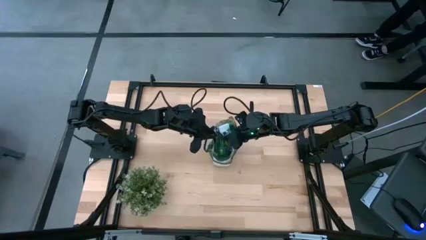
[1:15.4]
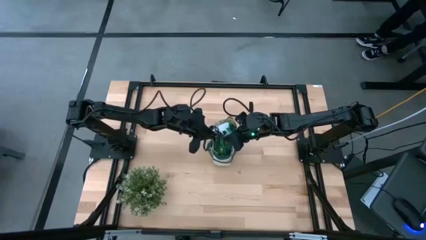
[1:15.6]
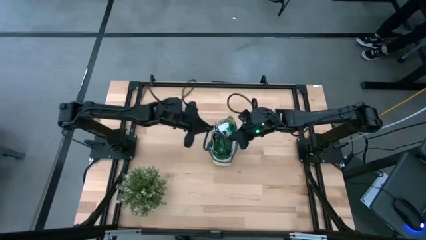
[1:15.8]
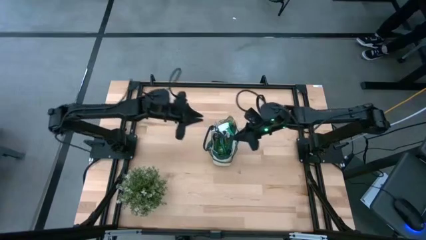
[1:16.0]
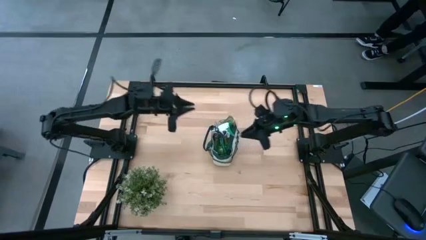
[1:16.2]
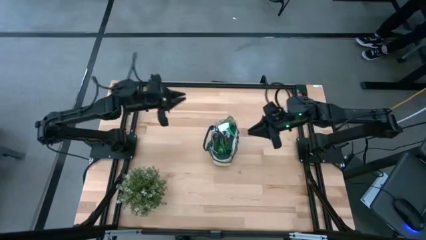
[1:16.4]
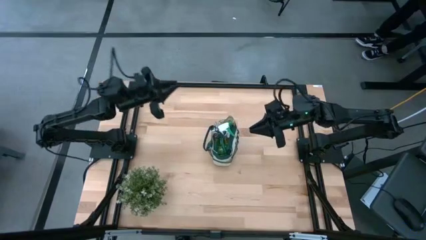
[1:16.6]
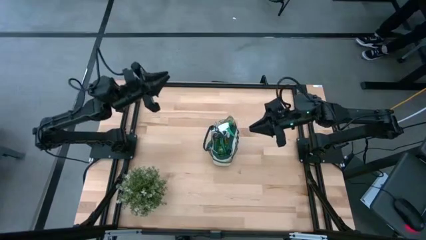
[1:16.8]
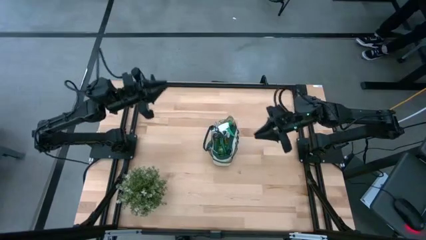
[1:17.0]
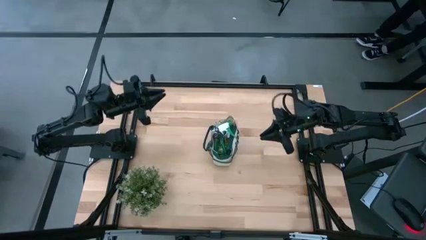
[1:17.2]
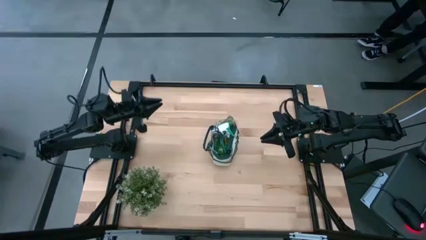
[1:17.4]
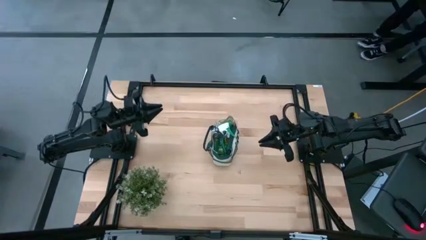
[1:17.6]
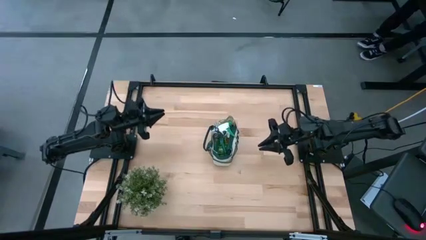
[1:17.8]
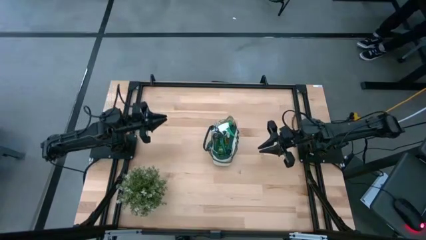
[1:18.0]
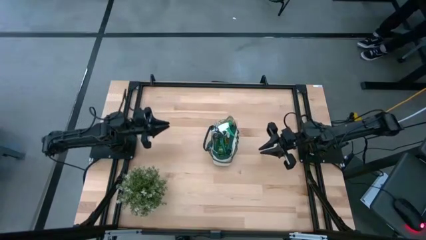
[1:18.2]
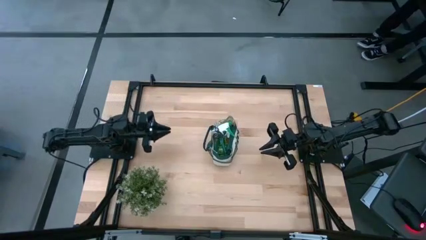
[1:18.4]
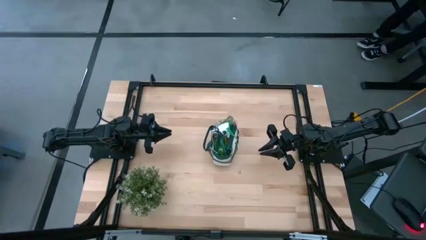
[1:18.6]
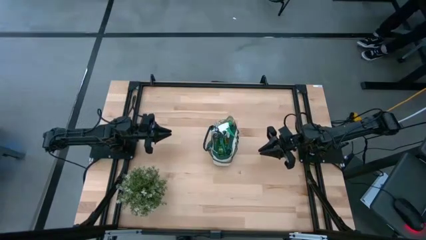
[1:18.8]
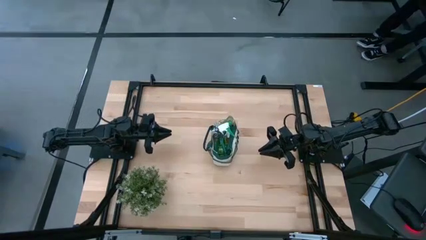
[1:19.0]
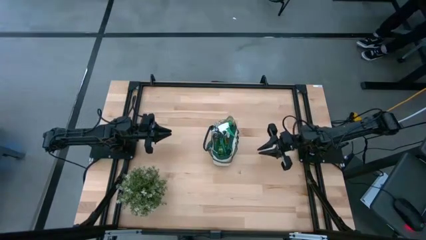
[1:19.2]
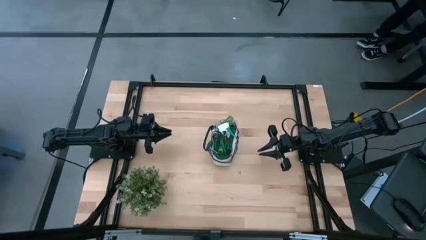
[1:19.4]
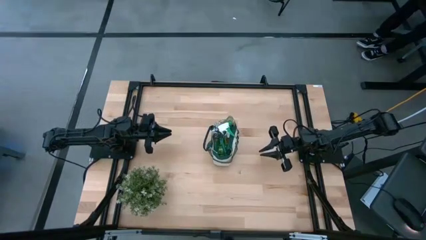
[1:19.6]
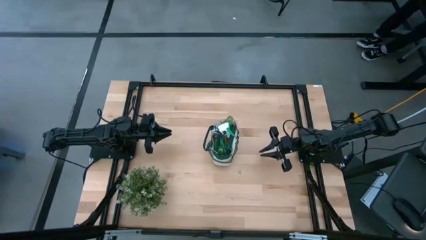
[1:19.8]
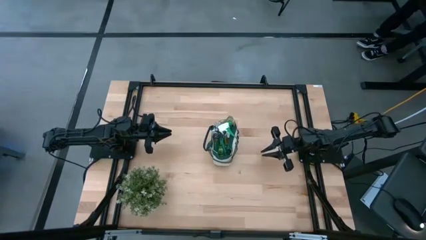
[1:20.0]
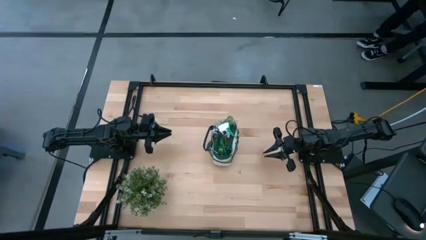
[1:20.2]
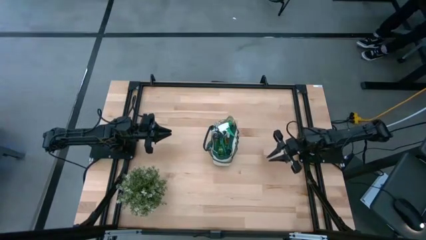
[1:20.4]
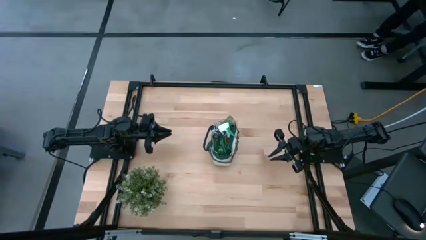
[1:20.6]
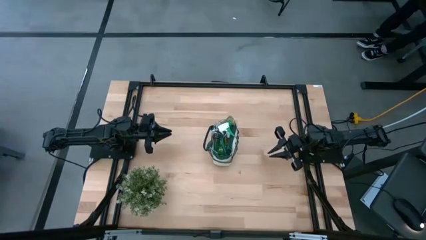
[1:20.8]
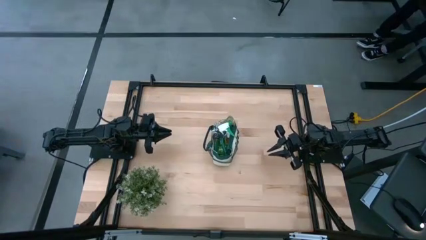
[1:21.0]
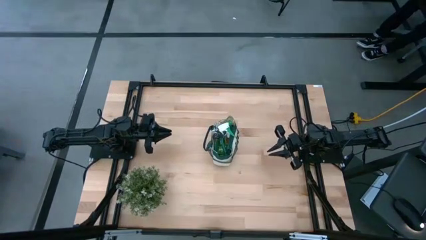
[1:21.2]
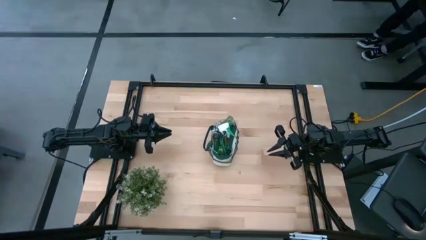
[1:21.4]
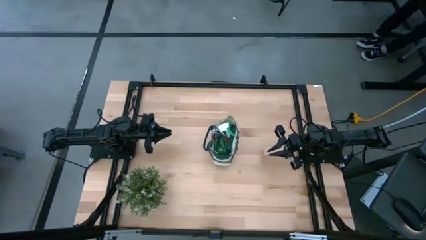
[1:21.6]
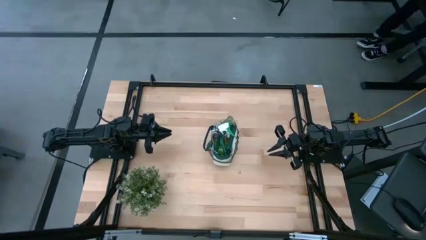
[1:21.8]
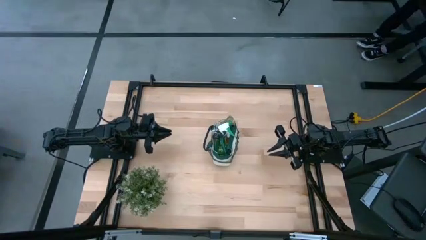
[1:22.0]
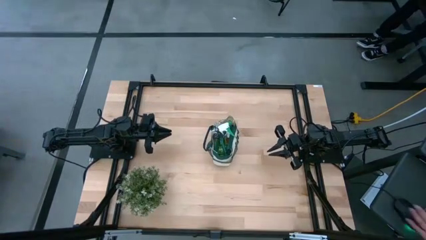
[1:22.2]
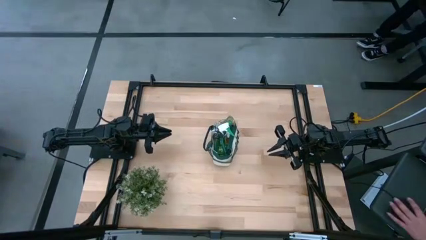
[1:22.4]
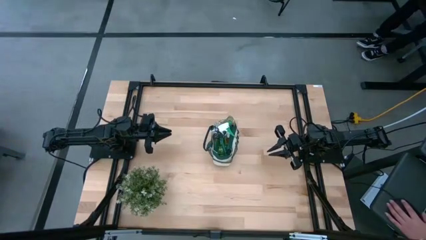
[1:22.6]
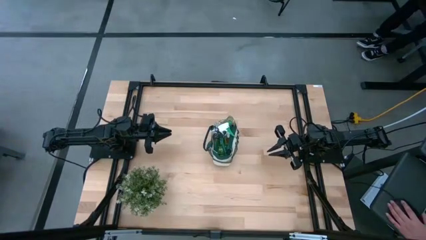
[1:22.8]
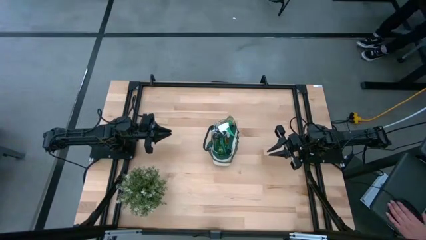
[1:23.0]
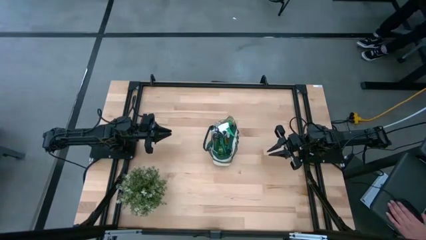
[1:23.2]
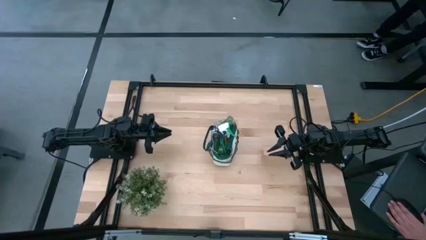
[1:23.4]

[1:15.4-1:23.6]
Task: Pick & Place Garden tools in Gardening bag
Return to Home Position

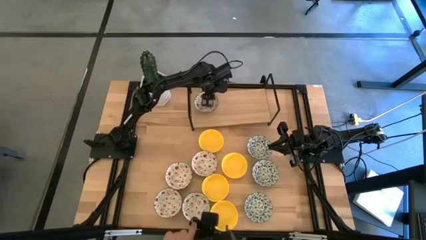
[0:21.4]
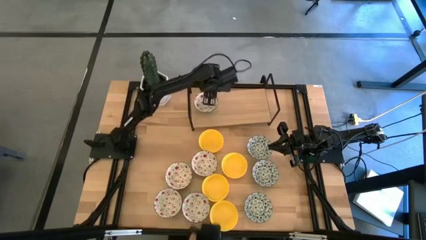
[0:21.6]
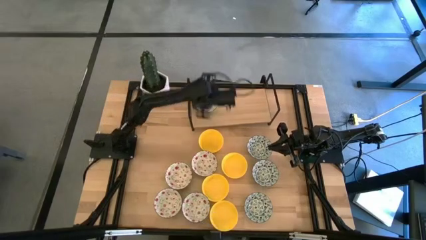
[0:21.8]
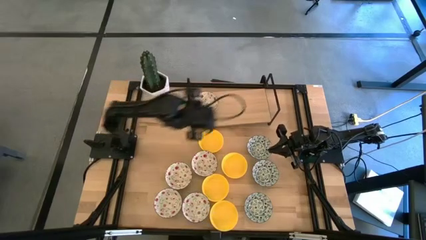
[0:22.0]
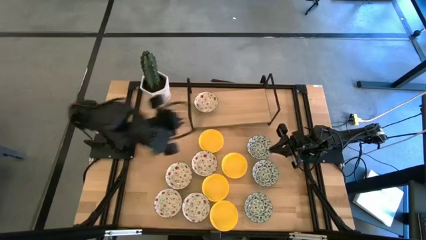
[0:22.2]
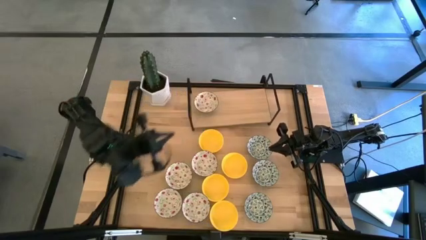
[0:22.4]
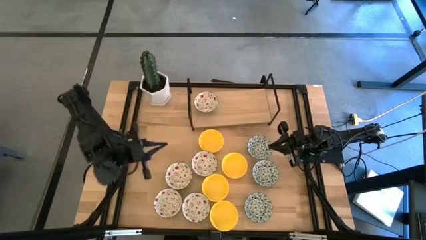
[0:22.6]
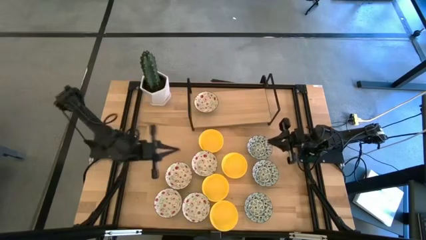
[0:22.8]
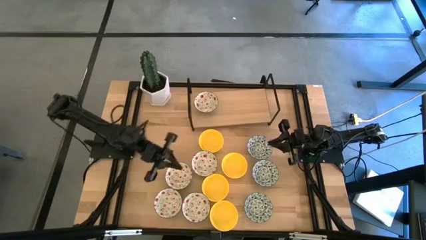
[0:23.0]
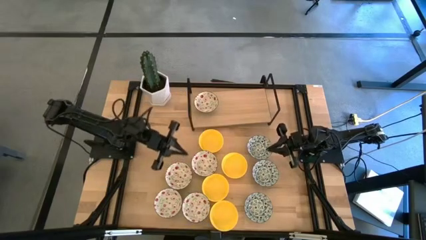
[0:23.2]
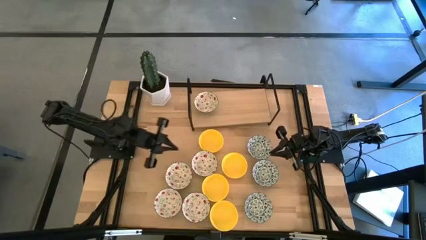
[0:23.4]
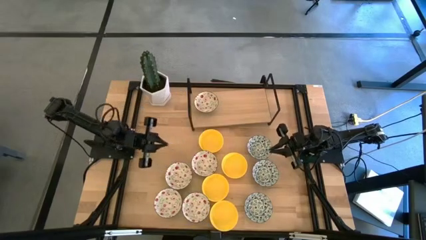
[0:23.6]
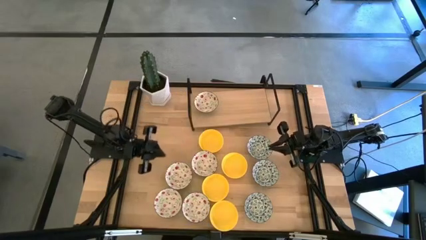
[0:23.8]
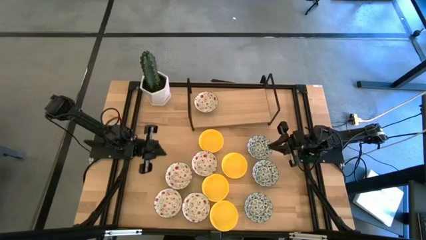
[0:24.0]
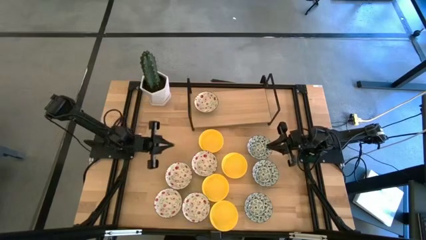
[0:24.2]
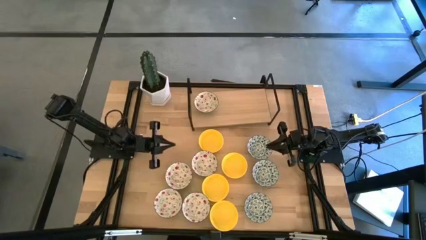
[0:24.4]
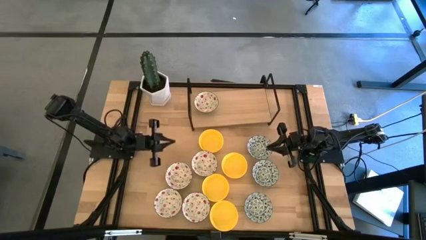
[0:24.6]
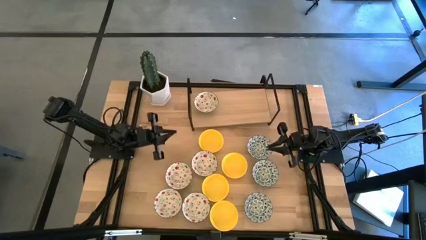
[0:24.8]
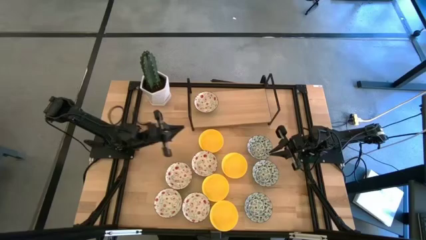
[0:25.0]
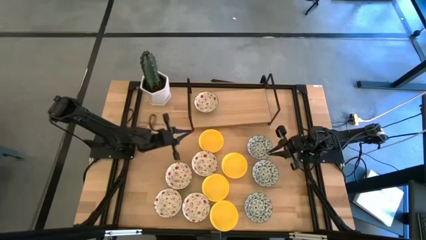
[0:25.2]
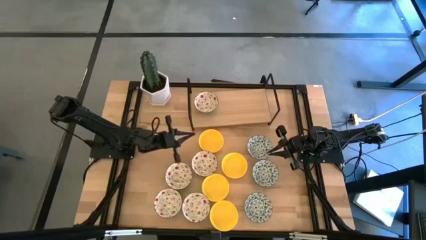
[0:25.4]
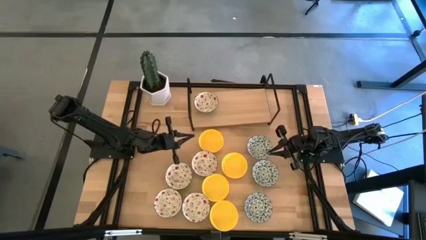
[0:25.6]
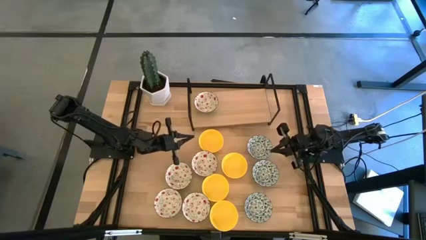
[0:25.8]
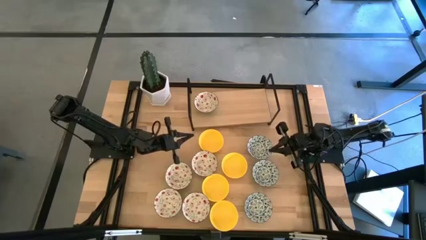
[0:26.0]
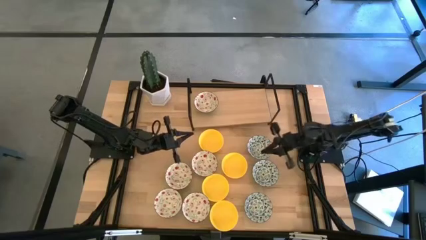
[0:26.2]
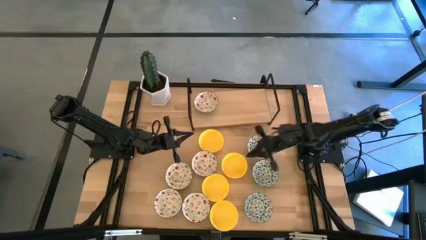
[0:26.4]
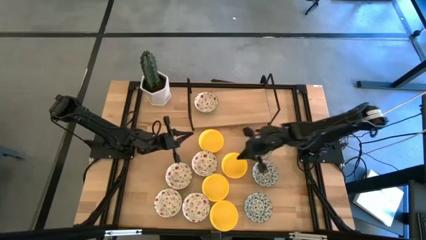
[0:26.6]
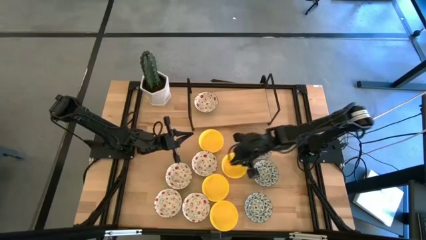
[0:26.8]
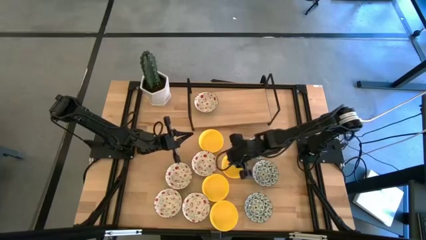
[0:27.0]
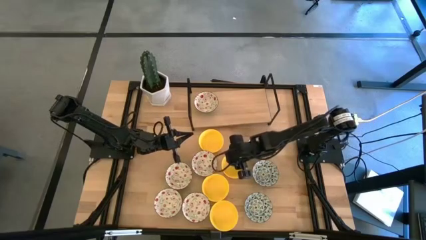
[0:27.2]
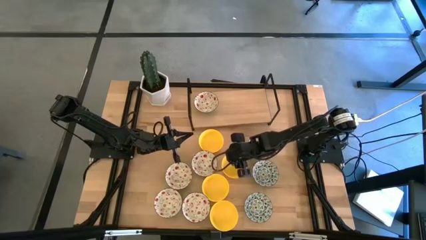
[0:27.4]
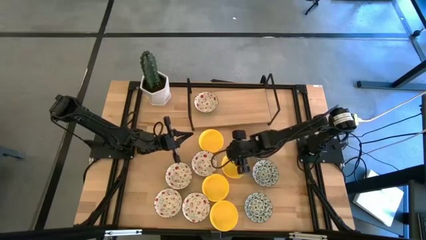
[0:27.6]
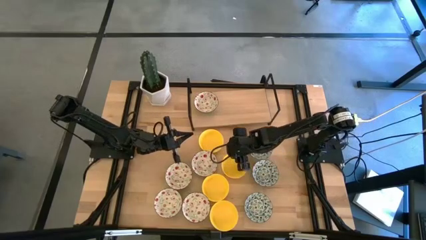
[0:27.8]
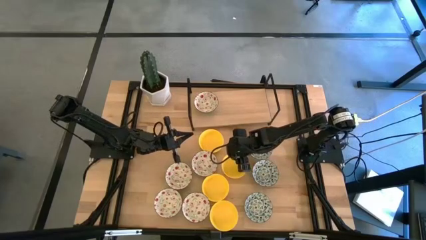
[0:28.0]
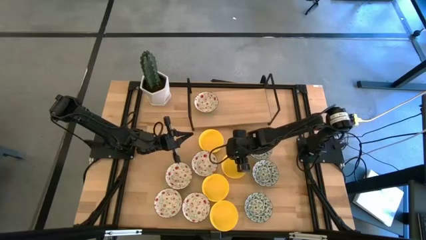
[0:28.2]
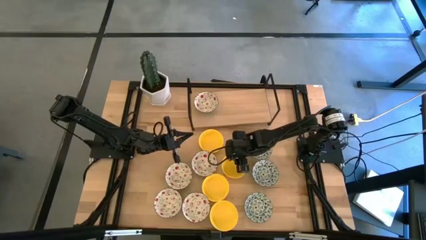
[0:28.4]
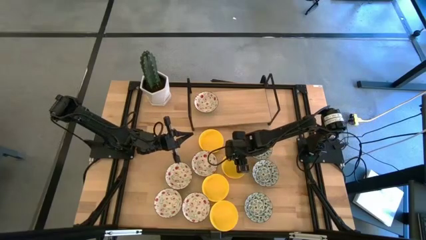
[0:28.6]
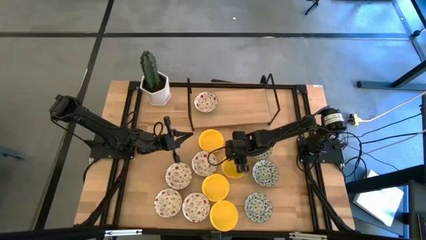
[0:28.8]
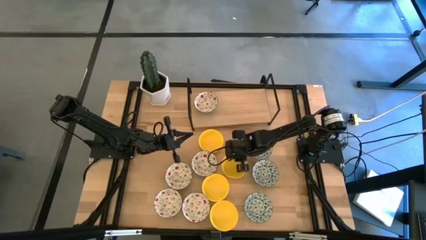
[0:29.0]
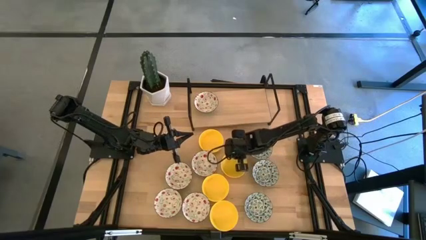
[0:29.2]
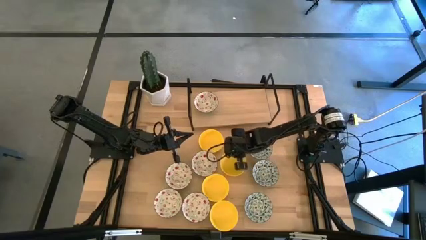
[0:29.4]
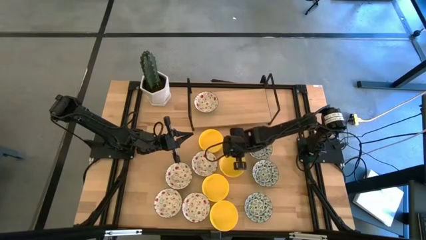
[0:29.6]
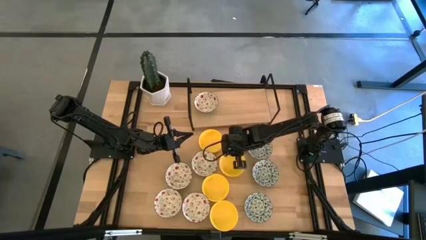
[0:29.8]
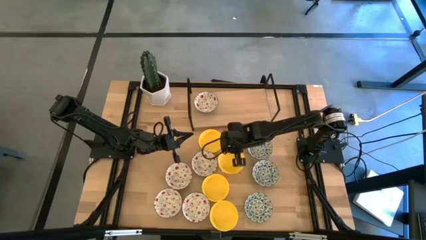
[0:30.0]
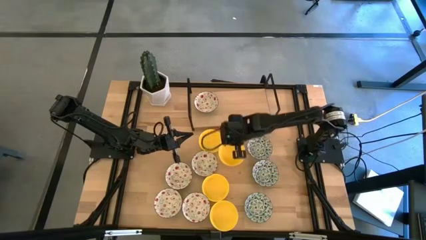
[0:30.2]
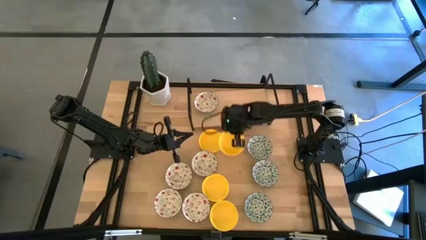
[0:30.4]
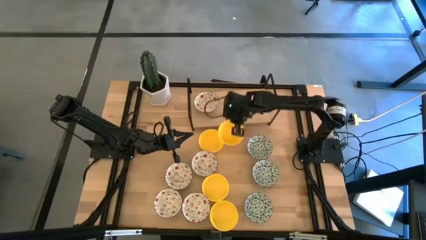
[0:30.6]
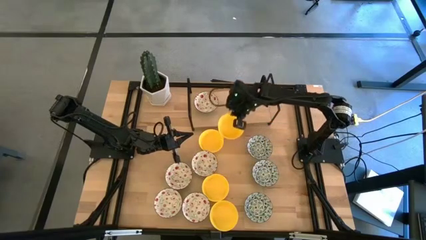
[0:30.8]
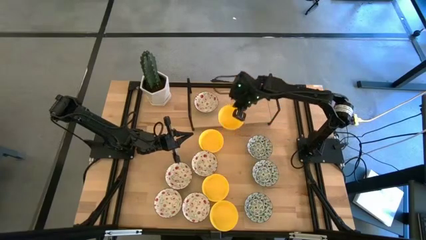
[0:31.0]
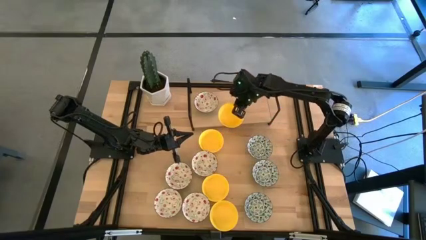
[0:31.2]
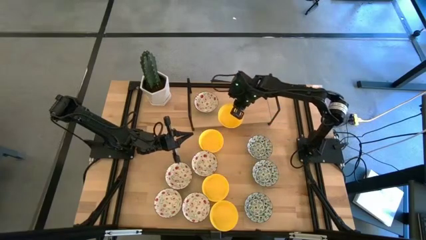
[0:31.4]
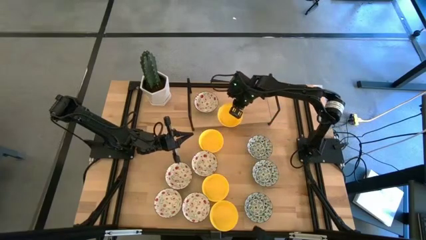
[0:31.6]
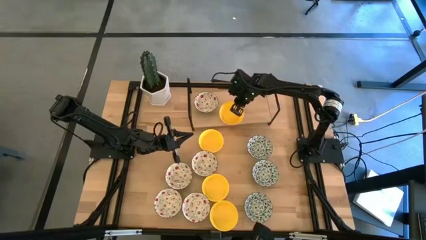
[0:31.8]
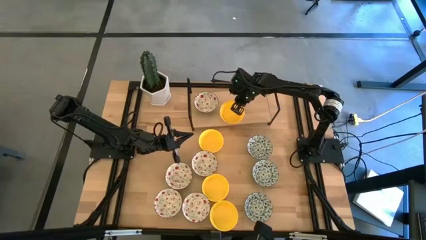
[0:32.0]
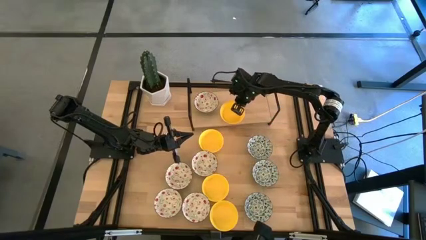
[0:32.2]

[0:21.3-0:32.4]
Task: Pick & Place Mini bowls
Put the yellow bowl on the shelf
